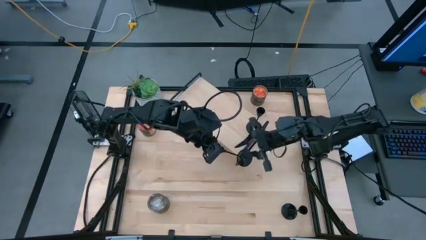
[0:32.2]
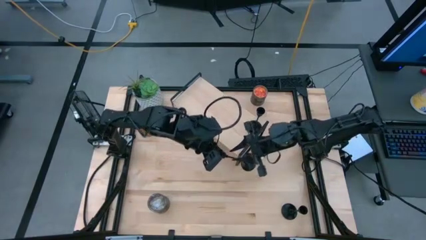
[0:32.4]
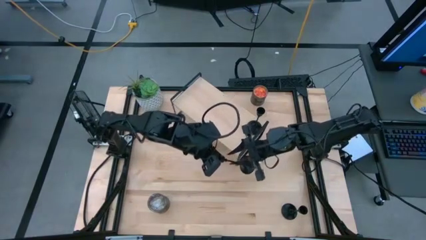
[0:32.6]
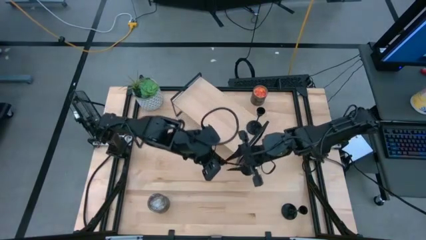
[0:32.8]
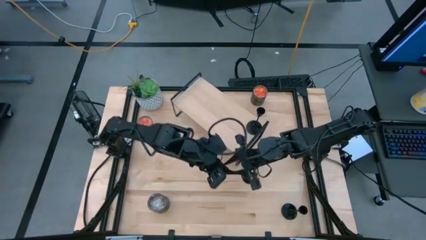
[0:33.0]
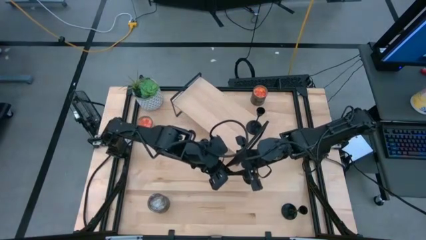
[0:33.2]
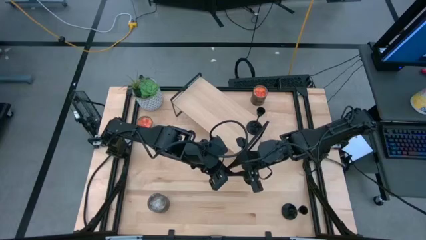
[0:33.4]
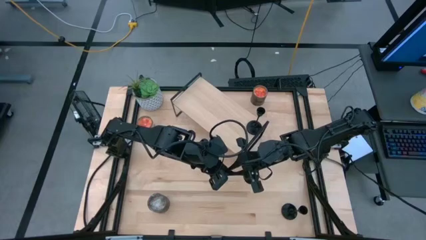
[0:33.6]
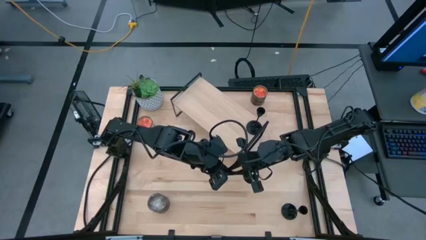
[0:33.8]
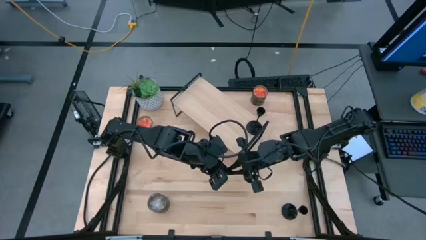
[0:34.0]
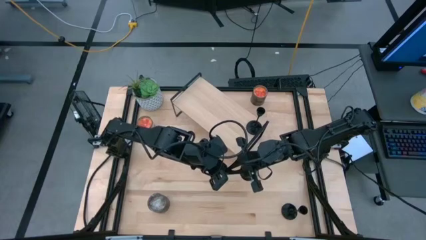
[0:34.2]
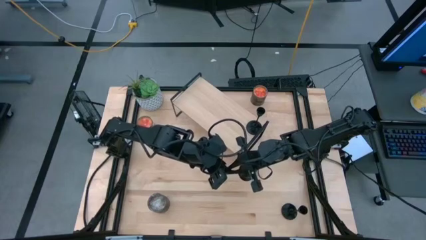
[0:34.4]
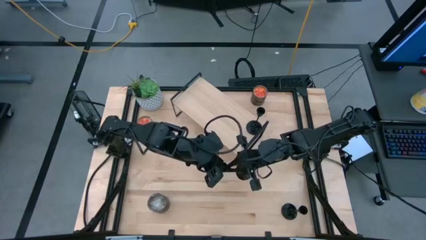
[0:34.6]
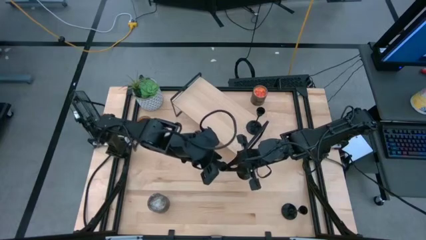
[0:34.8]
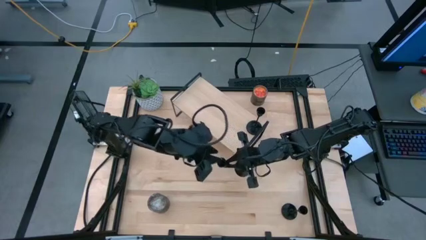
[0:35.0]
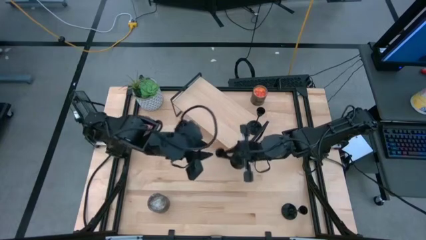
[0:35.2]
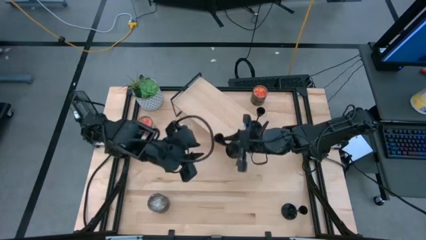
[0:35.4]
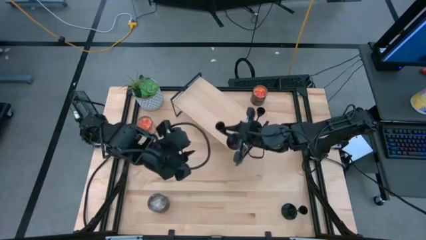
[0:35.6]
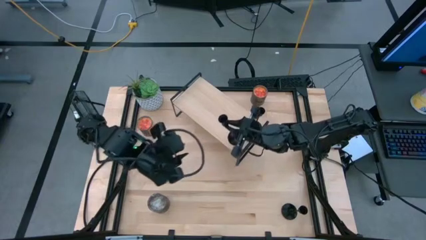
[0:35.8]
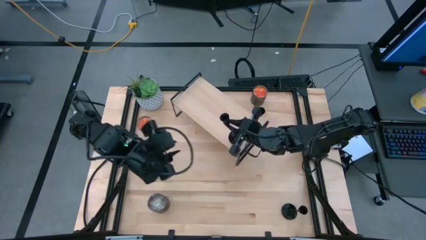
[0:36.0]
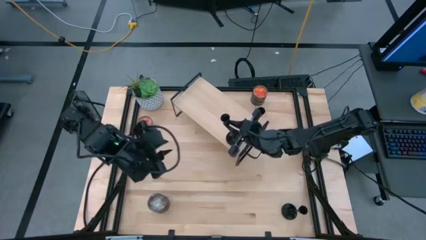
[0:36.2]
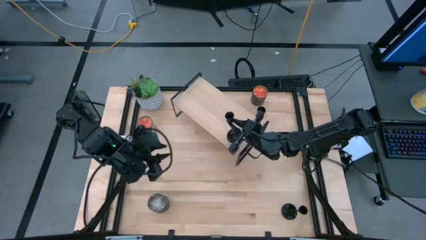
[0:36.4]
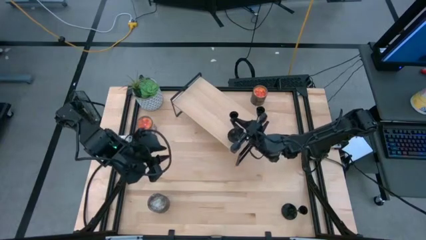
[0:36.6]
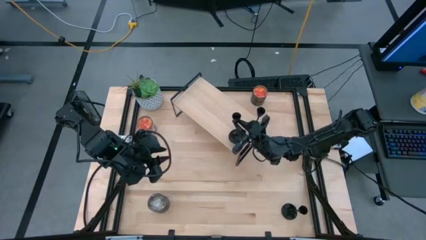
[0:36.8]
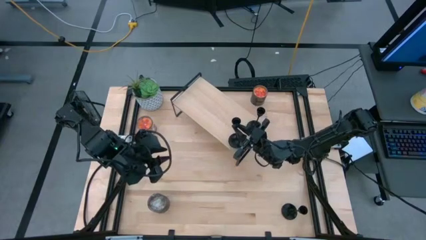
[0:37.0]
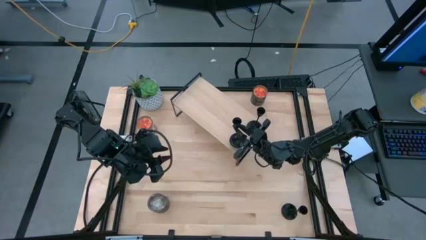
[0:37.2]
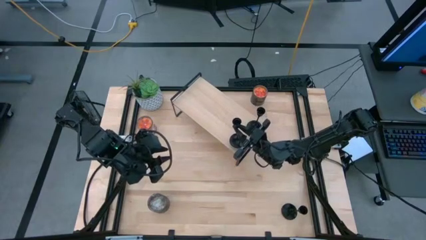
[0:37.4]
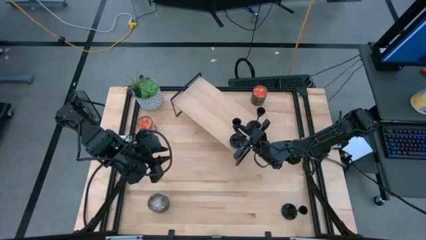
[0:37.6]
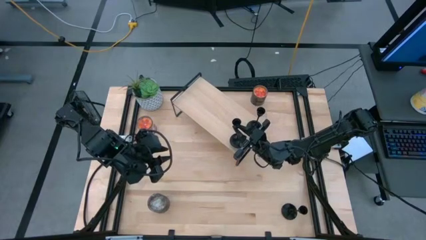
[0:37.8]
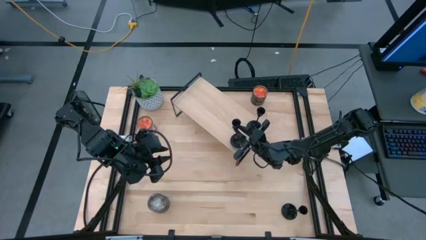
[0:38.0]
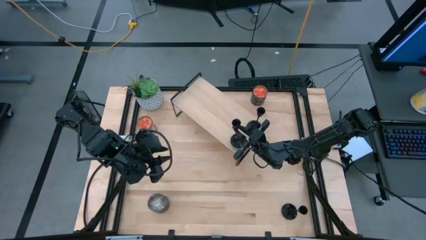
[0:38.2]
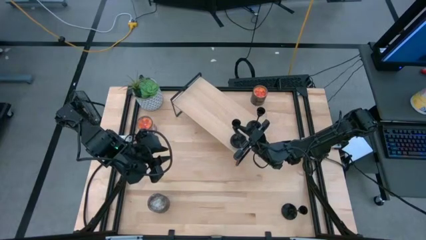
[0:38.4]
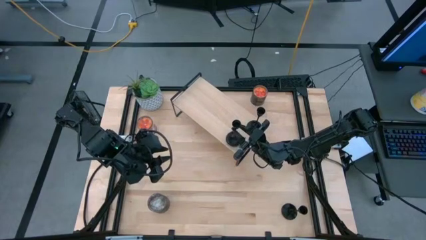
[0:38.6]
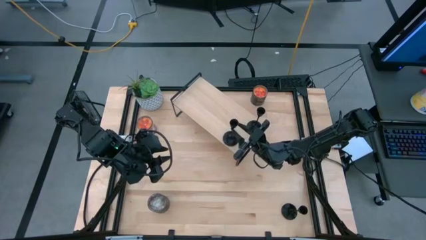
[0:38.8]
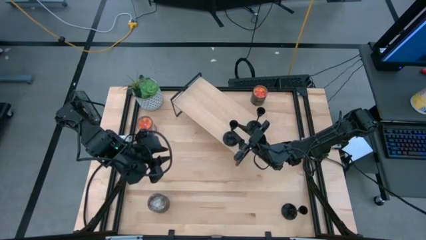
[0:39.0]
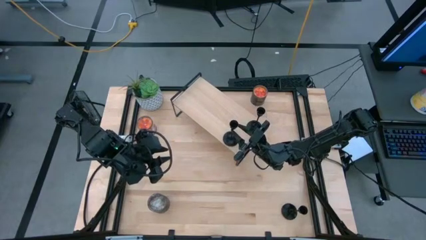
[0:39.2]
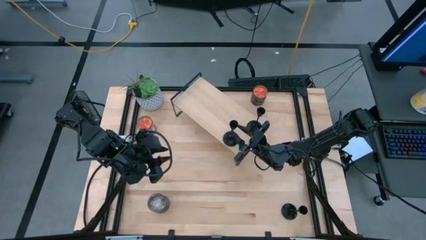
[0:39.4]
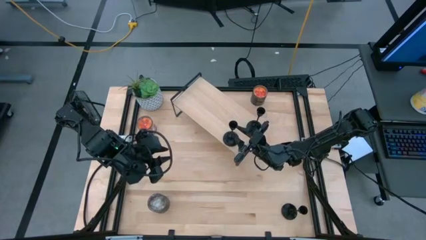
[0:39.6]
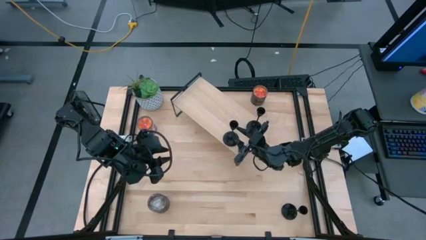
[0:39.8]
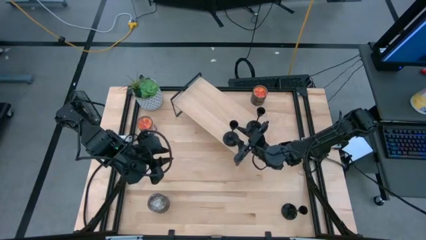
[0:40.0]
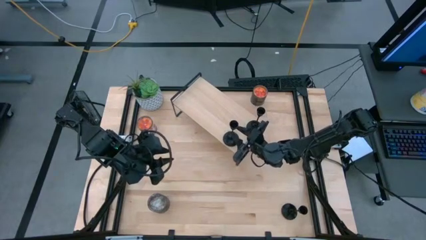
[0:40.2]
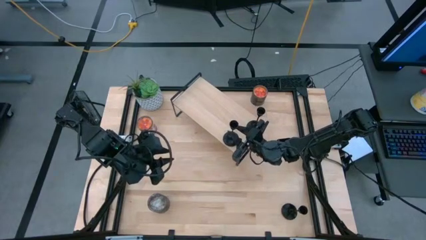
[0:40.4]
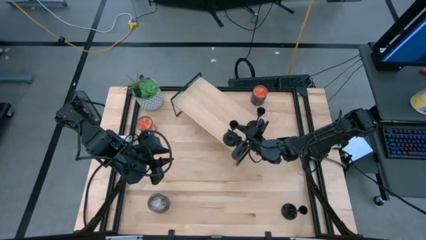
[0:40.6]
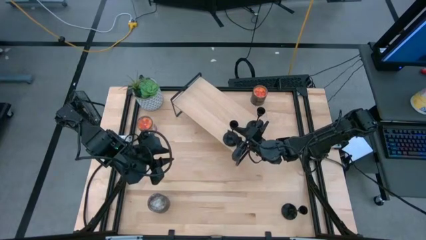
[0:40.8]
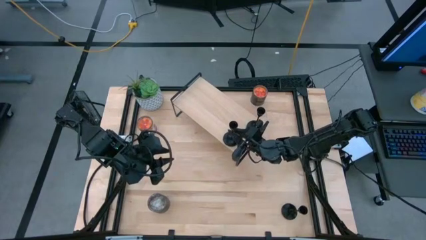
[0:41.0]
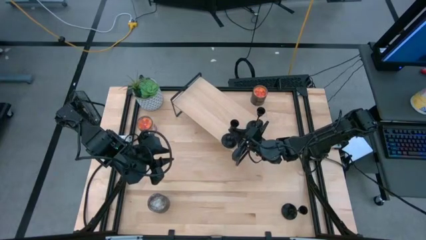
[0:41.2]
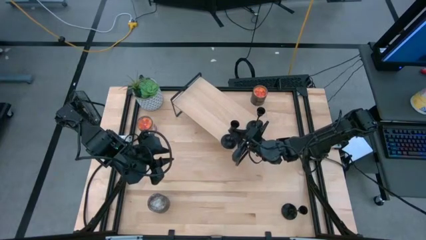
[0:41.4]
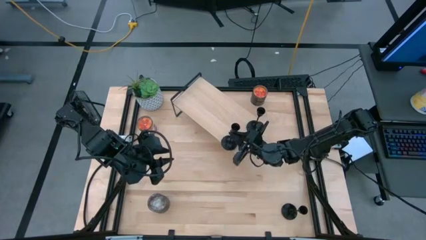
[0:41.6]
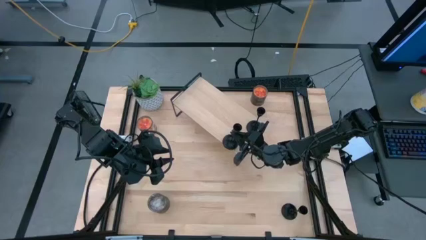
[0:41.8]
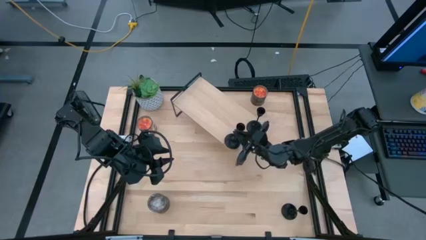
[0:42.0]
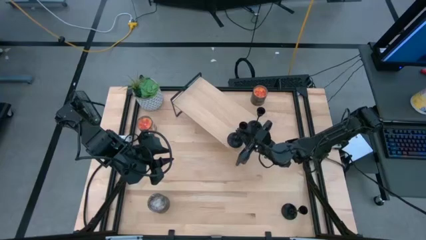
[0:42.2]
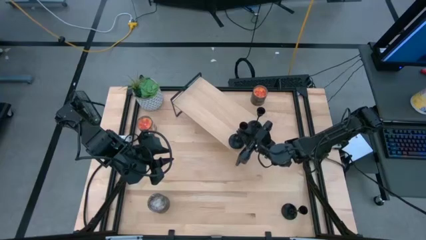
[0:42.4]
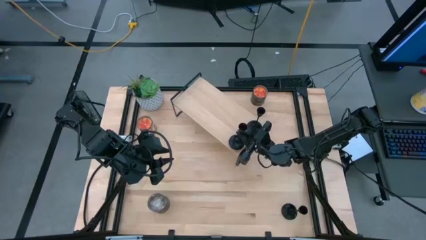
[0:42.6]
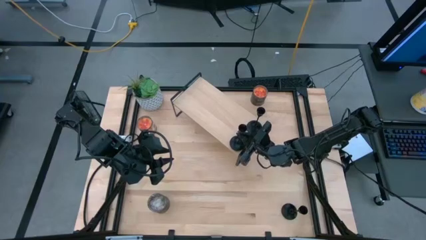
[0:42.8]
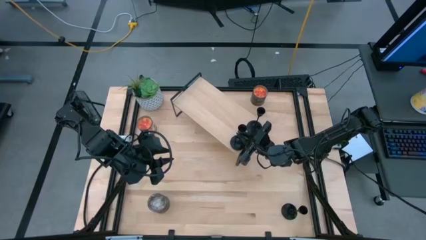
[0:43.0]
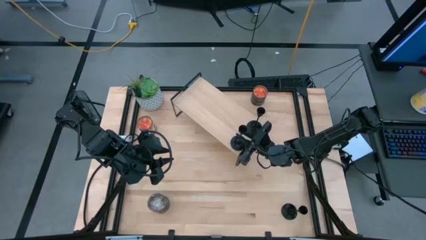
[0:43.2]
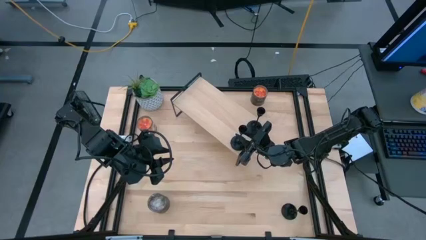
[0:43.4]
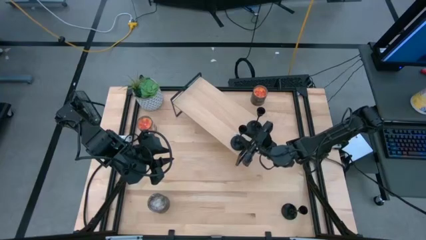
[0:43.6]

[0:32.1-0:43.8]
Task: Pick & Place candle stick holders
Put the left black candle holder on the shelf
